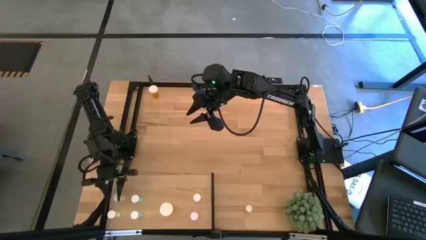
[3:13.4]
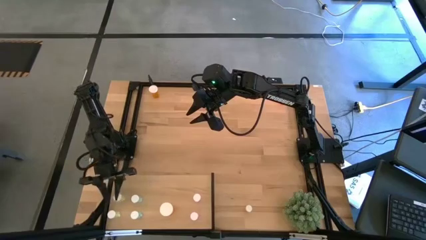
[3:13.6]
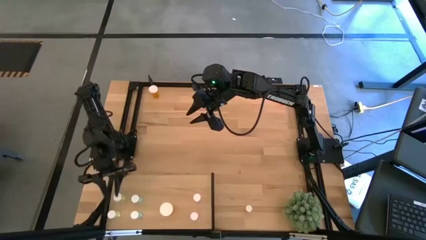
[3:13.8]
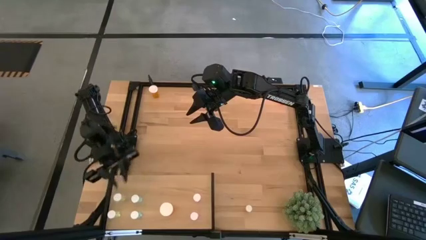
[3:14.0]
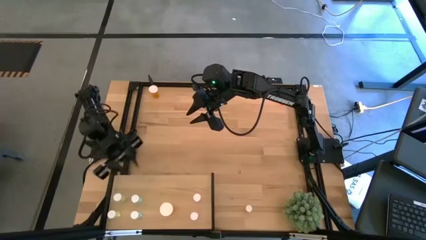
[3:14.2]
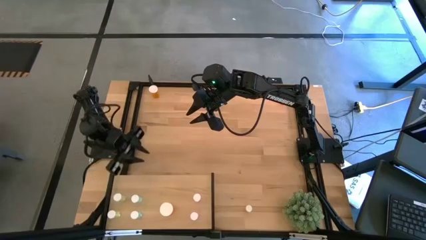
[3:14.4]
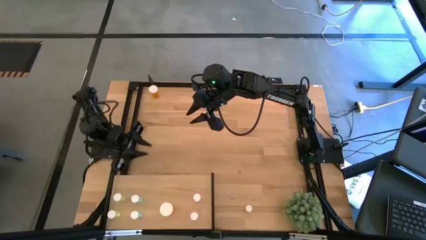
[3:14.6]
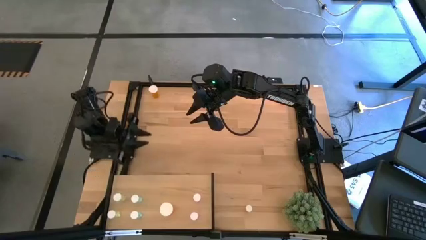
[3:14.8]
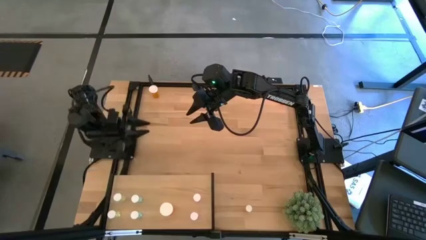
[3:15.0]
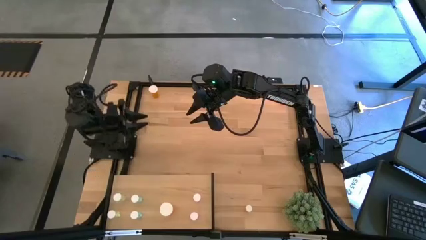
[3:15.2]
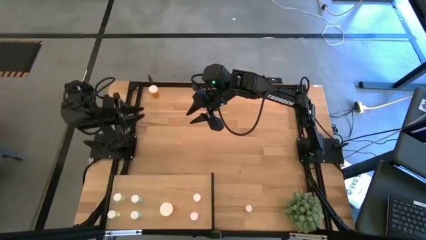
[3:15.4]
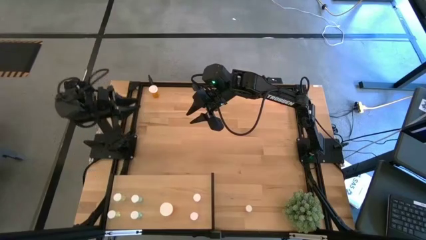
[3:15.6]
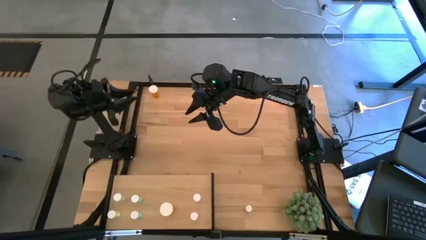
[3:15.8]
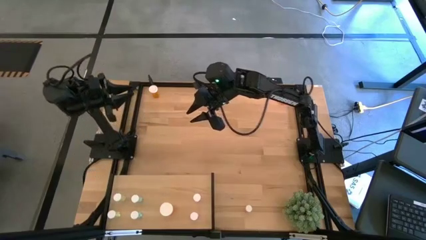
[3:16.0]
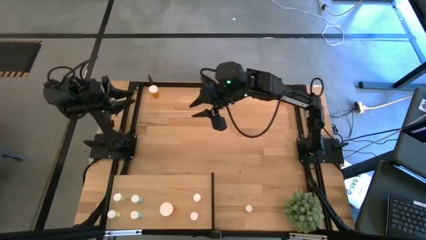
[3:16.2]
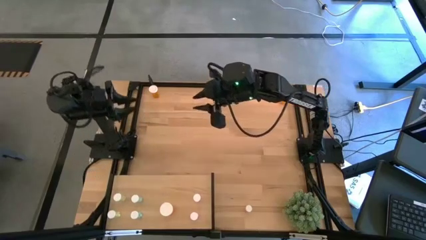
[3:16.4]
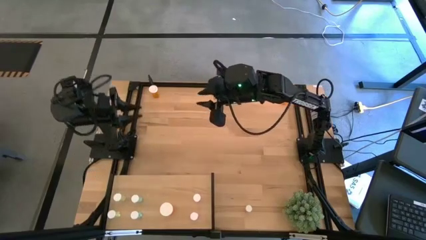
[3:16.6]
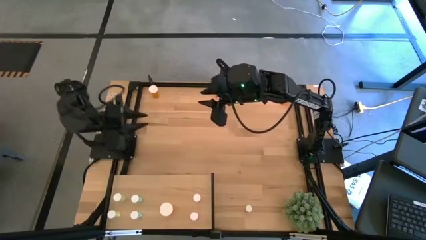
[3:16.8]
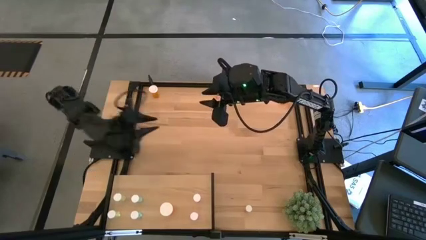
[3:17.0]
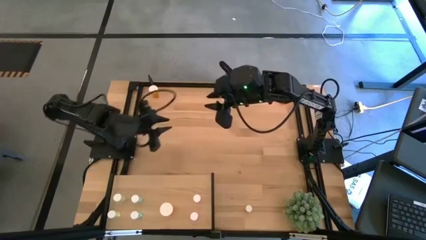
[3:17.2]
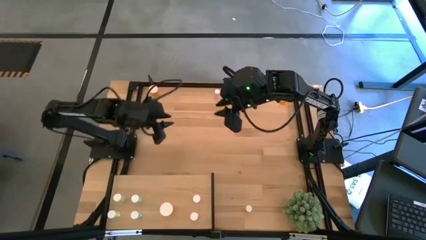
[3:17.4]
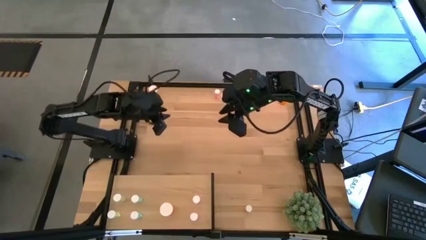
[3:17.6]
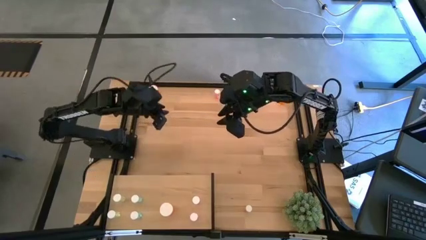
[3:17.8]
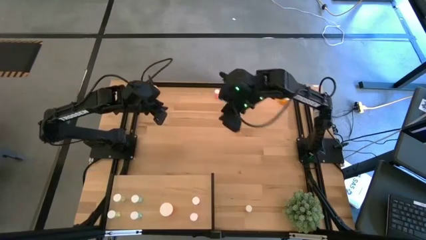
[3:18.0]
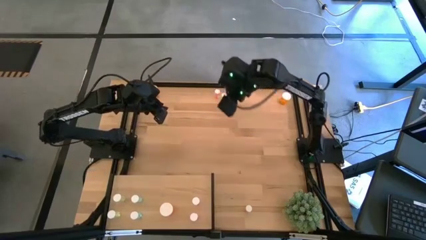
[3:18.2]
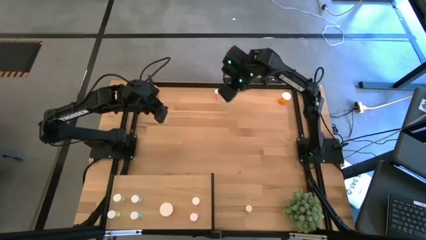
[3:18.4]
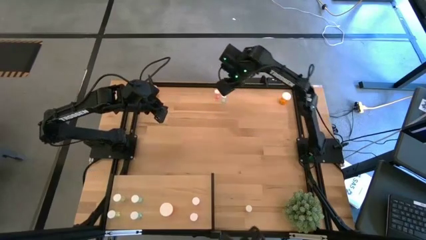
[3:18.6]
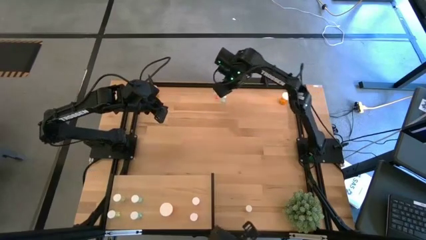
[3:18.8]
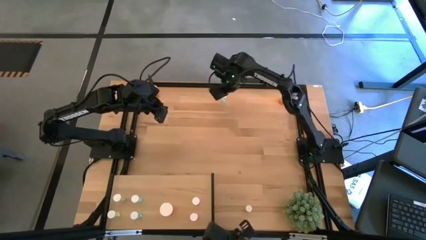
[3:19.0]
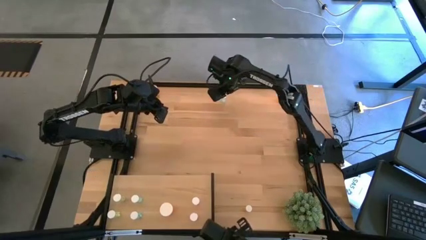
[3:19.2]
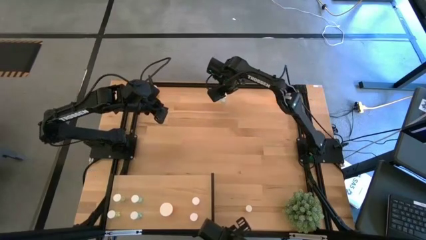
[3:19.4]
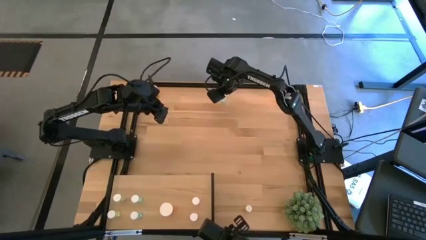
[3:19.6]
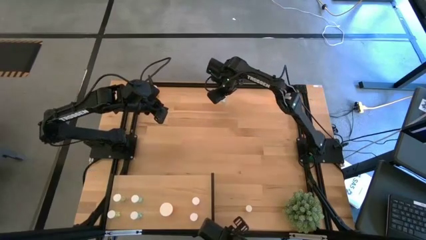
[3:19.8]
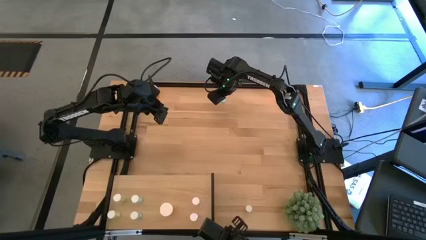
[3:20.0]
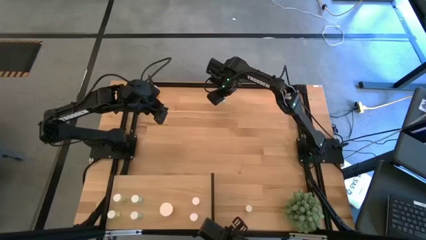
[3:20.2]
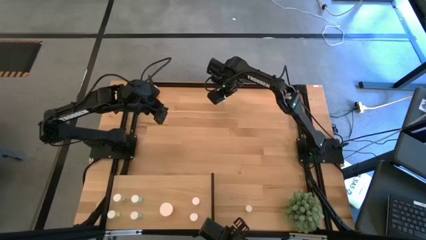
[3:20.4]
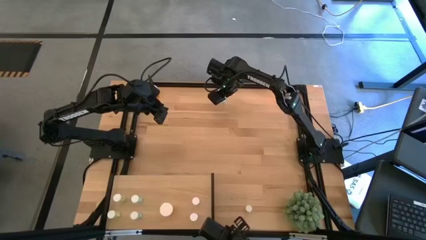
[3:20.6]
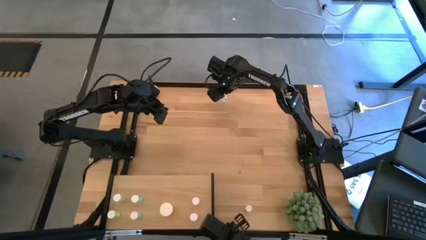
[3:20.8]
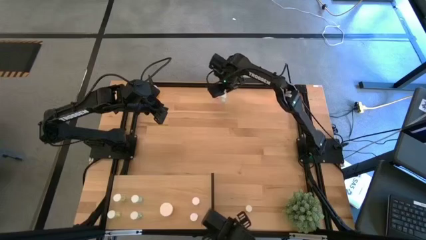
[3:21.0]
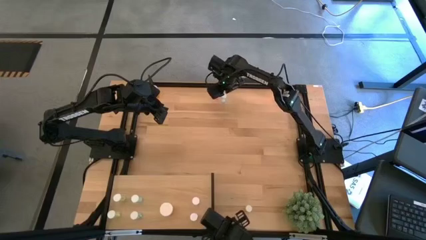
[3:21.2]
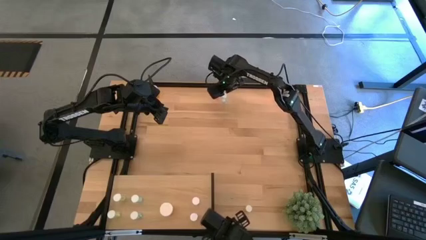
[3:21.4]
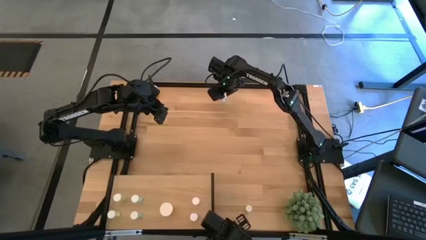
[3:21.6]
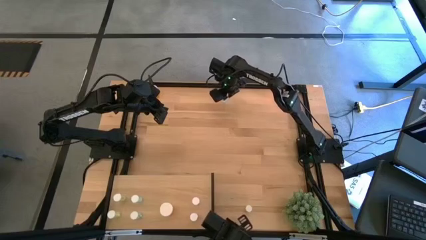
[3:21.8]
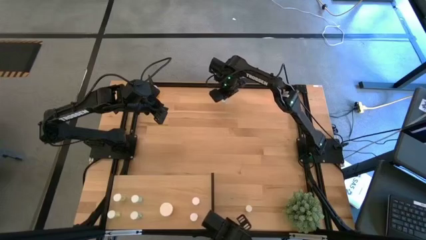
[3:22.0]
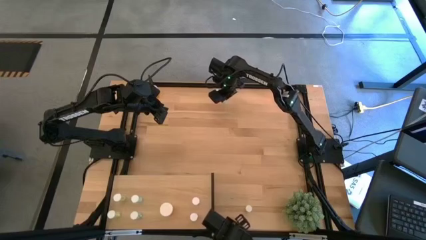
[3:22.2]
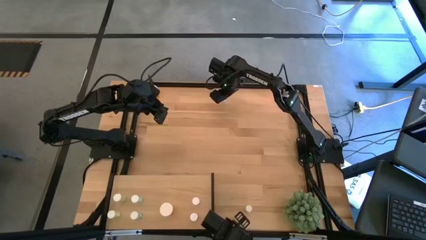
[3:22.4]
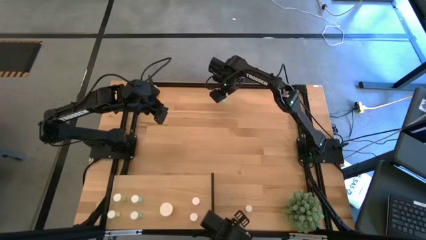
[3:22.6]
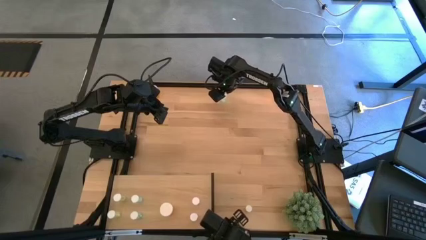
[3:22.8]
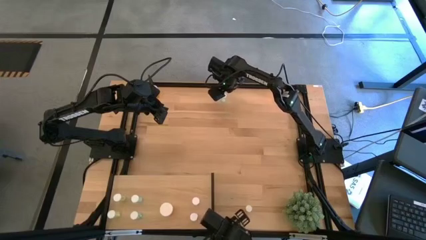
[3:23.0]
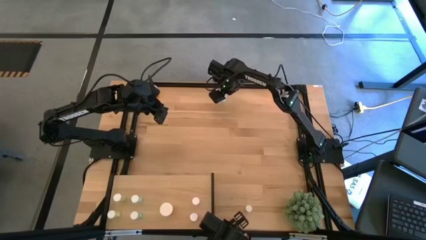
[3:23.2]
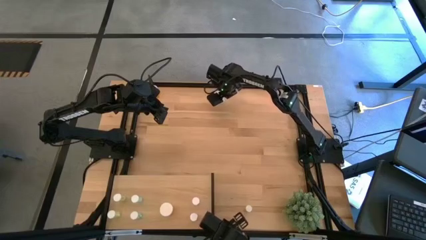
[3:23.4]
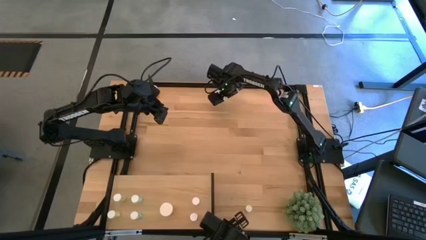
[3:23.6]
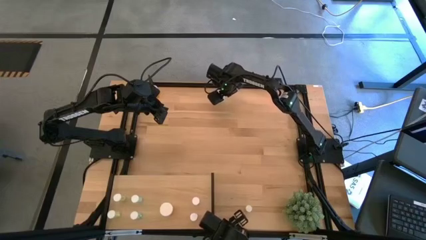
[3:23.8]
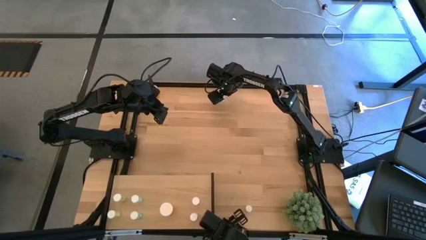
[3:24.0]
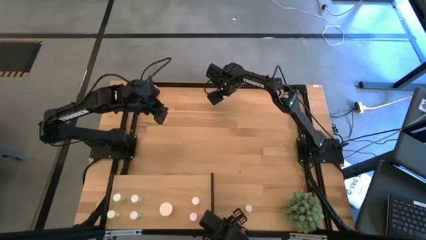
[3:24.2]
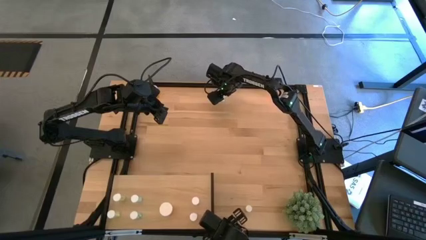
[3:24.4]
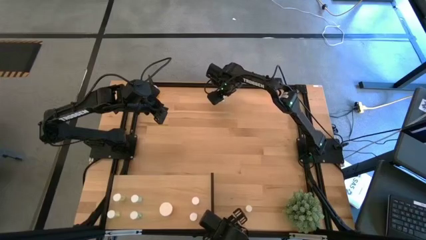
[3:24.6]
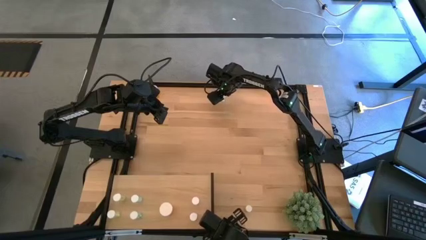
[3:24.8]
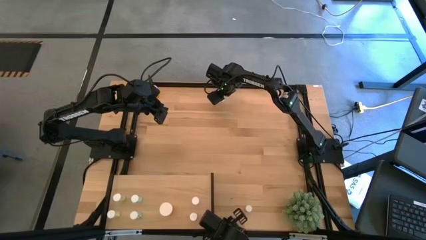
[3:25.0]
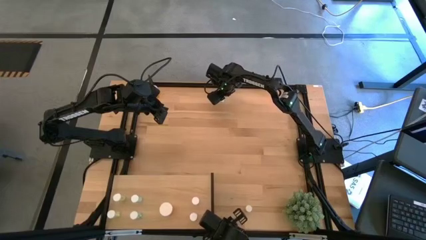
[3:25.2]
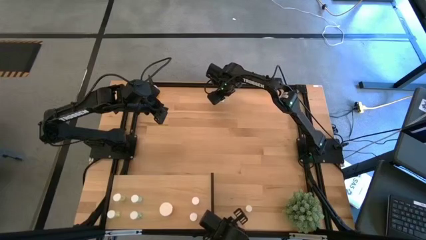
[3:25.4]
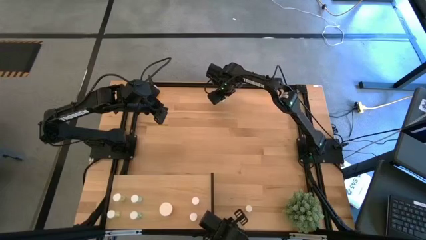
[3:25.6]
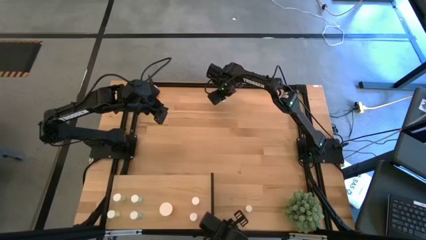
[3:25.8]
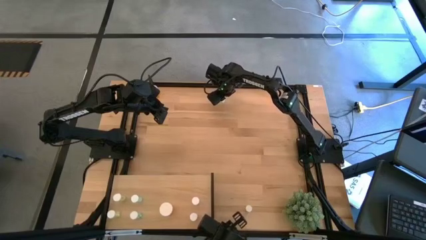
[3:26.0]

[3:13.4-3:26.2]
Task: Pick and place medicine bottles onto shelf by color
Put the blue pill bottle on the shelf aligned with the other blue pill bottle

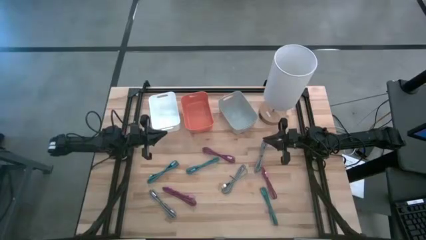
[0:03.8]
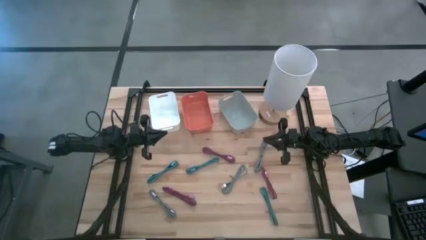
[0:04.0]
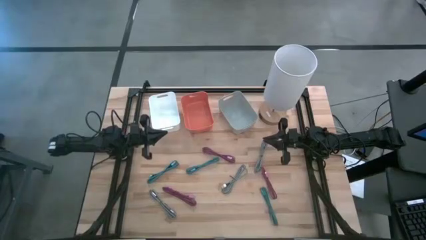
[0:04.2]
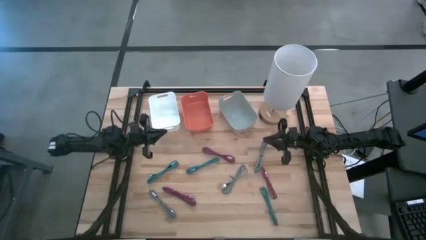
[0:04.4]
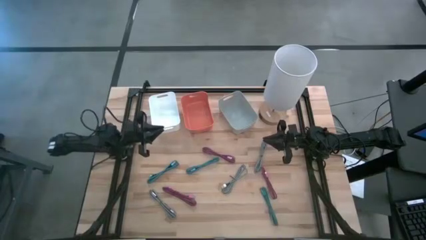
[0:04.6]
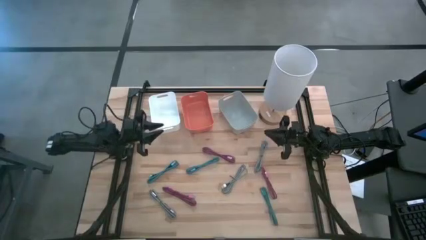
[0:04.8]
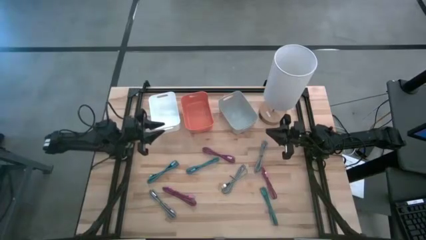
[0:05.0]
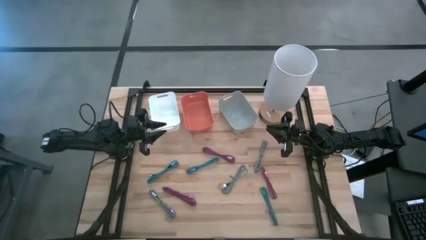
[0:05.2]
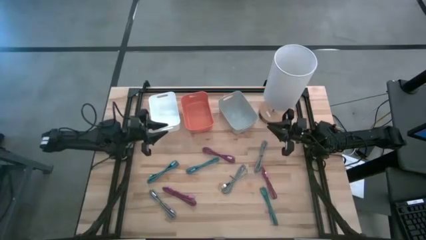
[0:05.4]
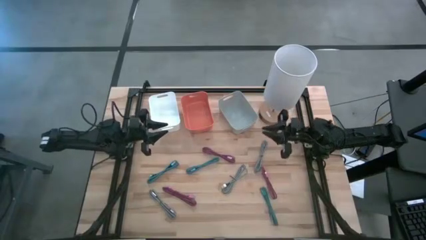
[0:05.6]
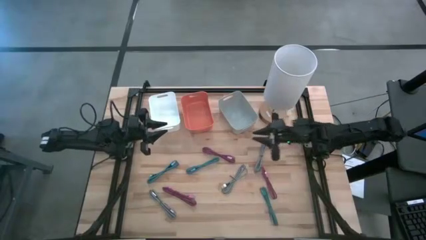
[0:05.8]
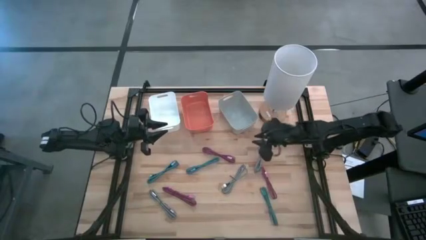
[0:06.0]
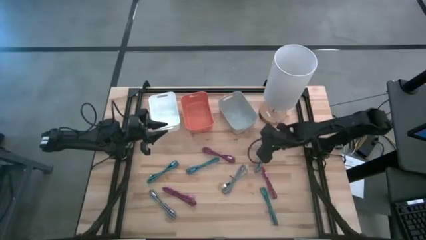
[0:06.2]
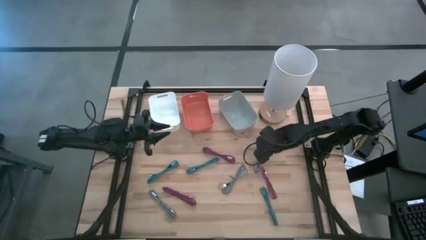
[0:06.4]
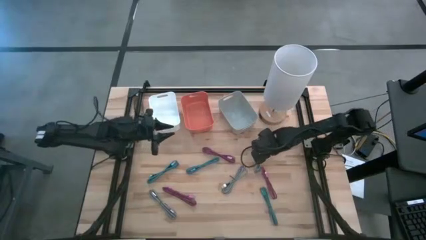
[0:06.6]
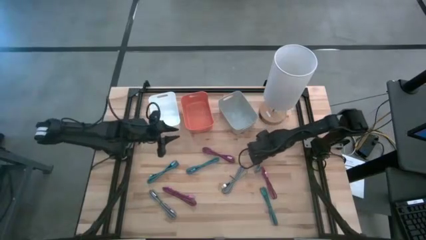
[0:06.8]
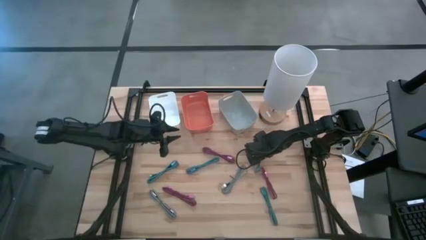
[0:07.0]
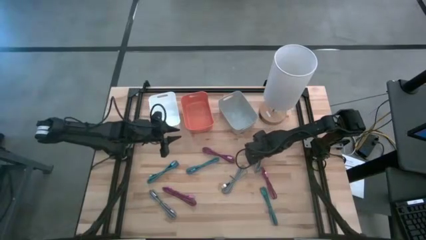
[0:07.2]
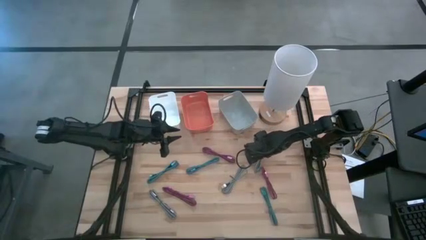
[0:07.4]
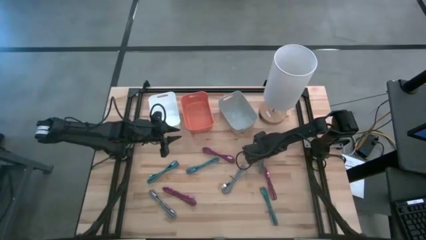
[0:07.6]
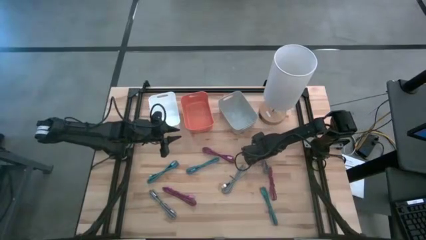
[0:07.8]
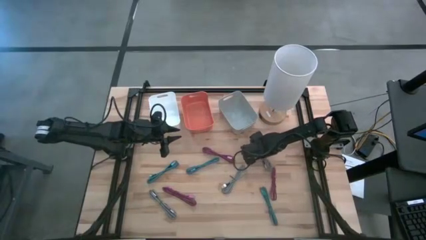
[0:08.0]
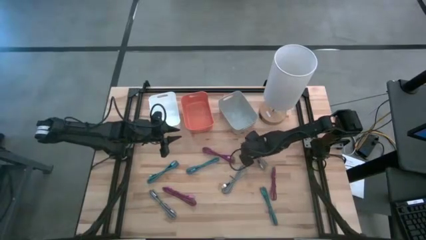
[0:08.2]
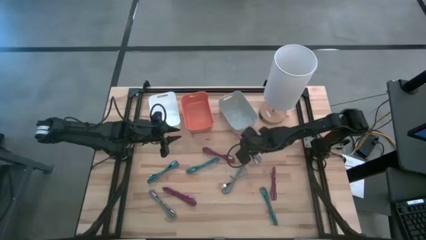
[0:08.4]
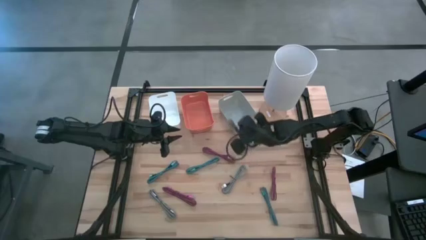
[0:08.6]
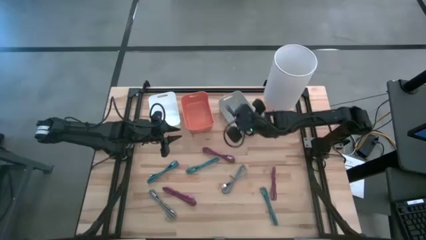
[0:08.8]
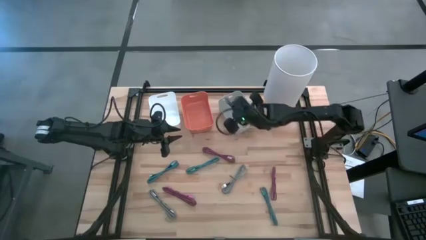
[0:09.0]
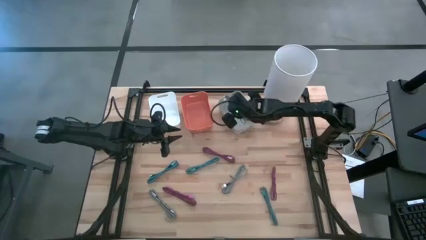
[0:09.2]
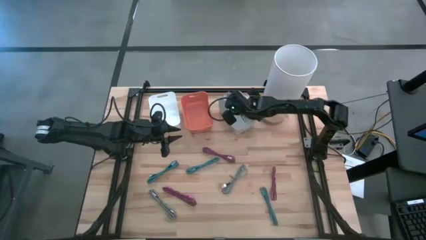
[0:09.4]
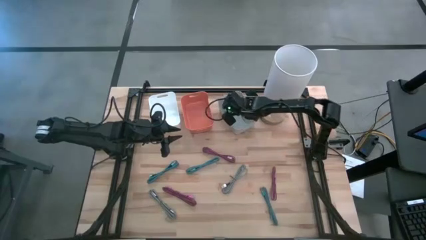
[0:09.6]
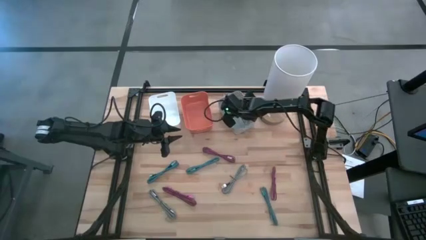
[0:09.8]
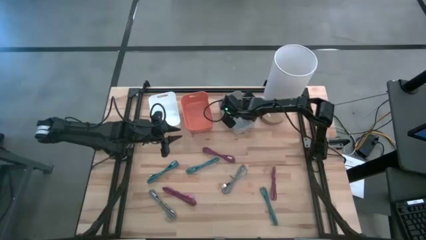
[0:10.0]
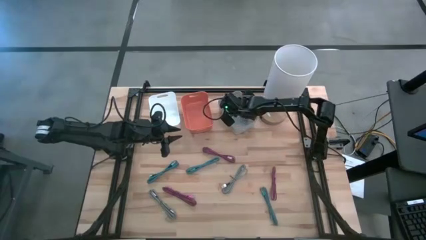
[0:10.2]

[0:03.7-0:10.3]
Task: Pick & Place USB Port
Put the top black and white USB cable into the gray bin
